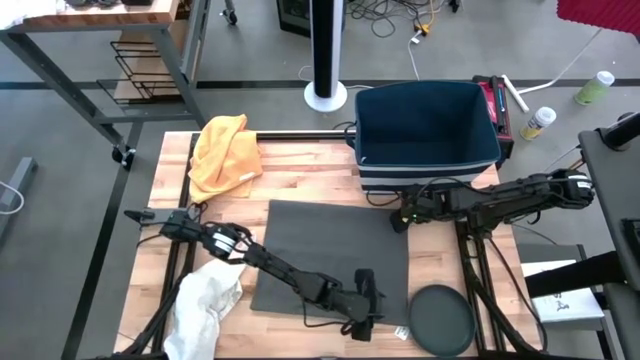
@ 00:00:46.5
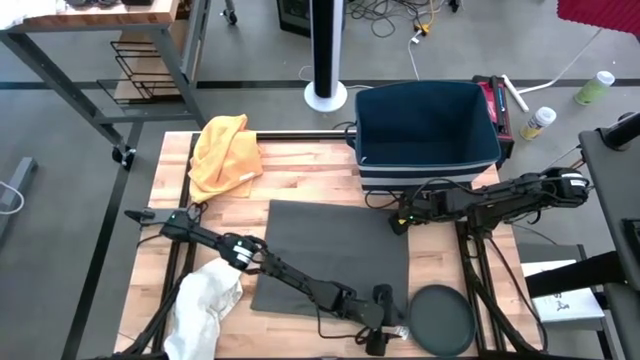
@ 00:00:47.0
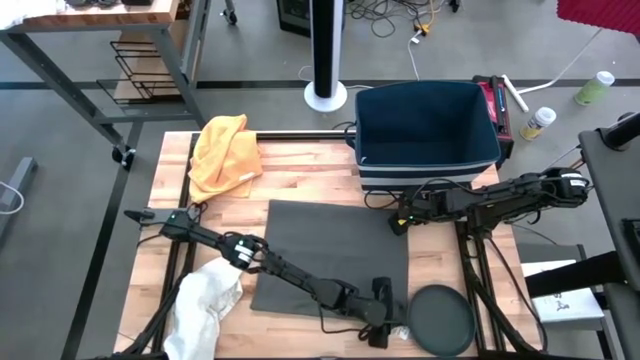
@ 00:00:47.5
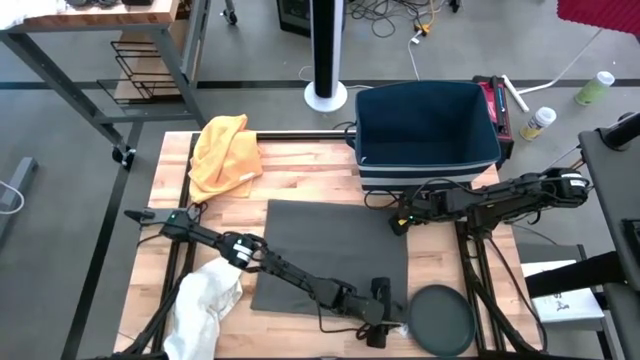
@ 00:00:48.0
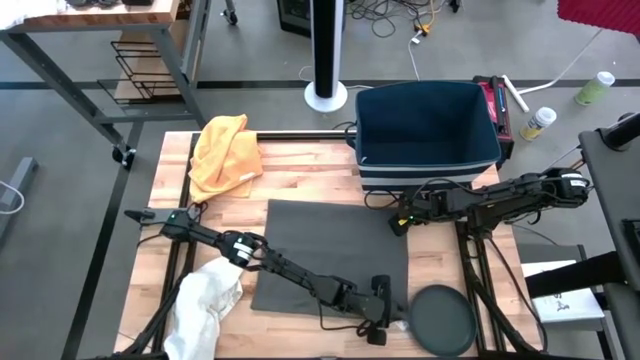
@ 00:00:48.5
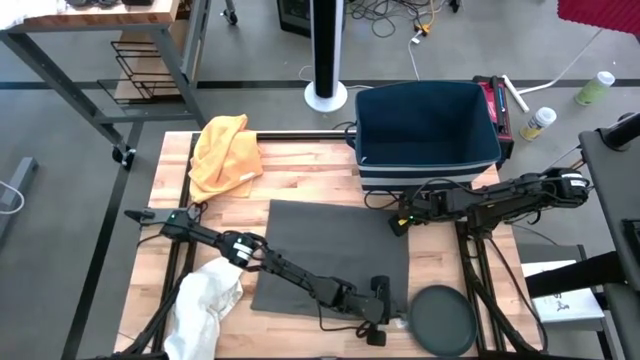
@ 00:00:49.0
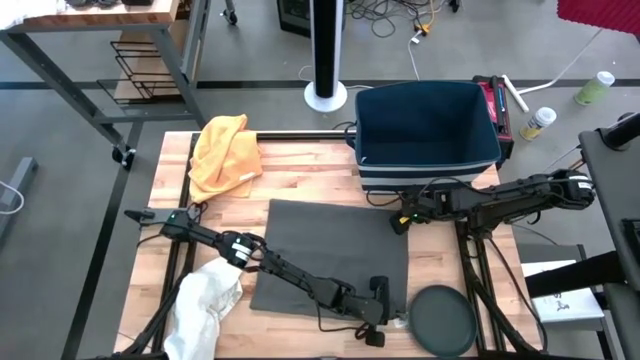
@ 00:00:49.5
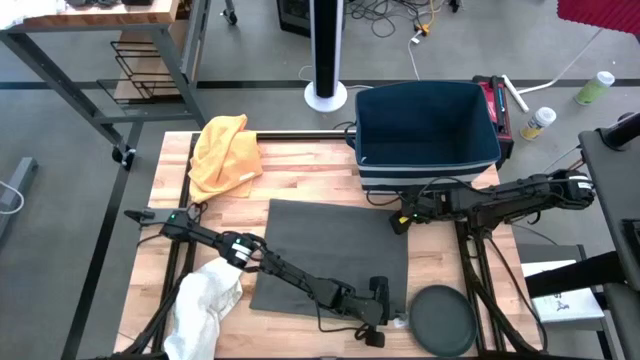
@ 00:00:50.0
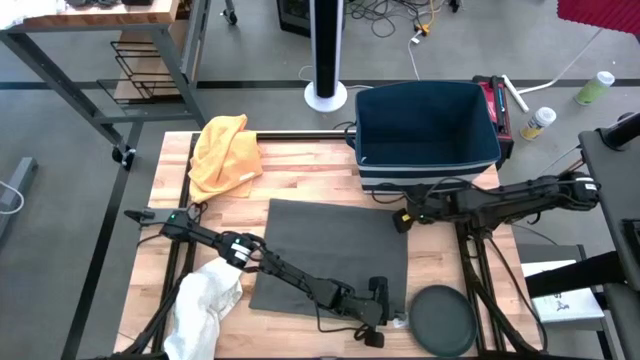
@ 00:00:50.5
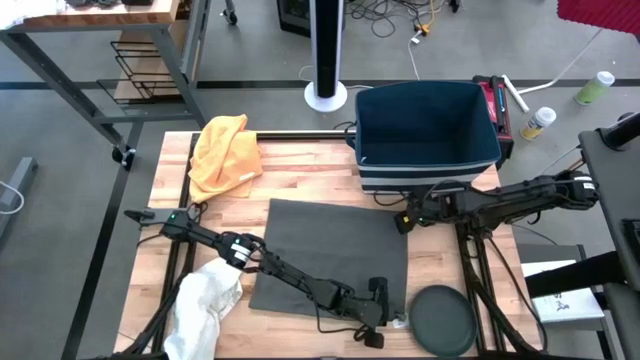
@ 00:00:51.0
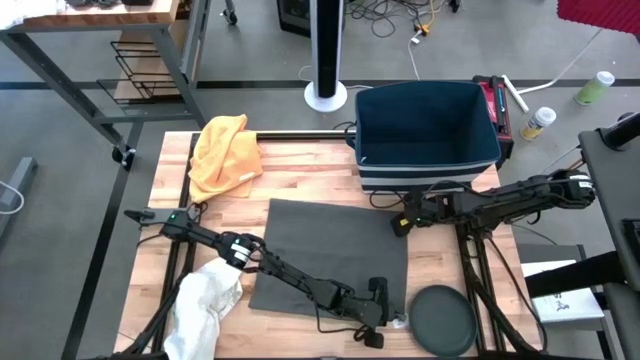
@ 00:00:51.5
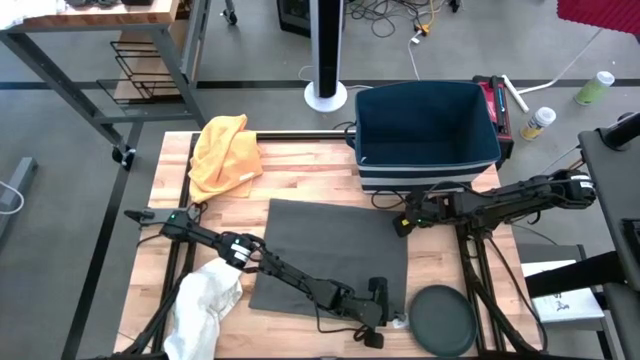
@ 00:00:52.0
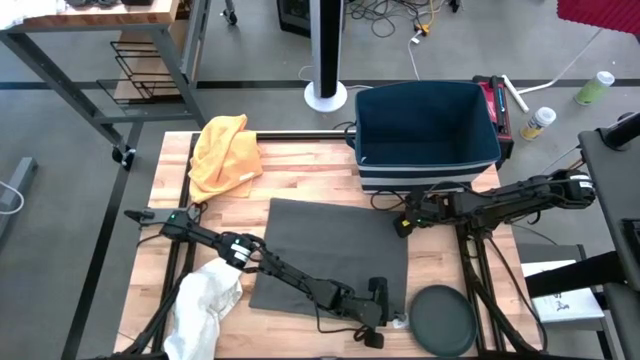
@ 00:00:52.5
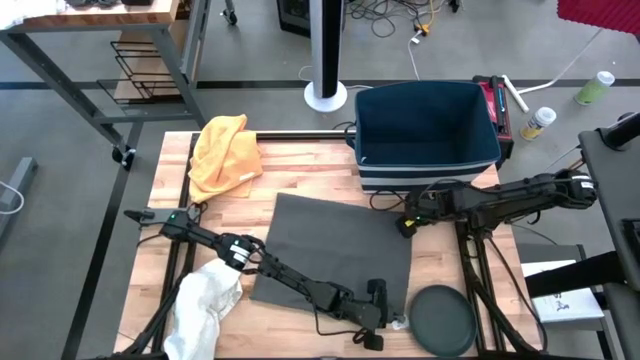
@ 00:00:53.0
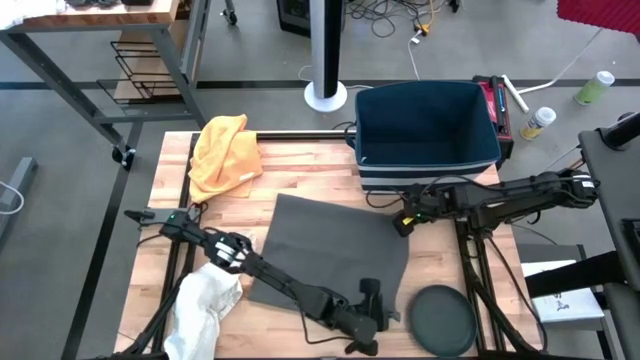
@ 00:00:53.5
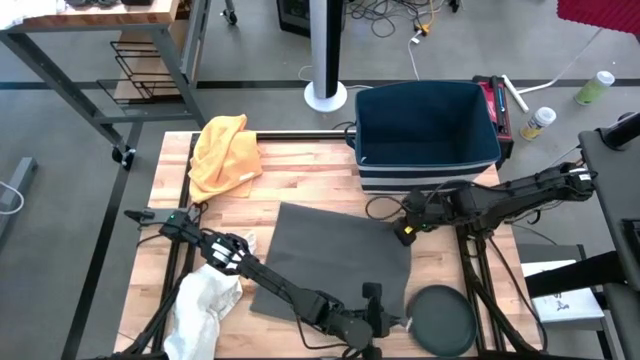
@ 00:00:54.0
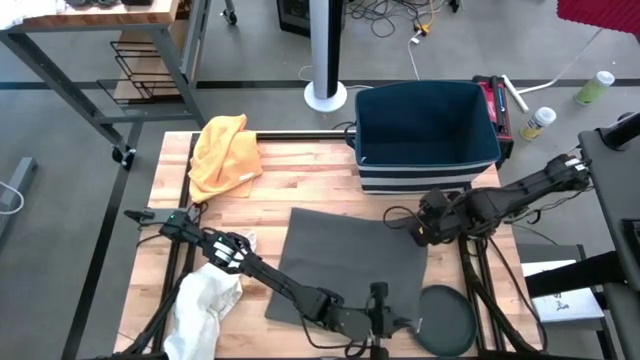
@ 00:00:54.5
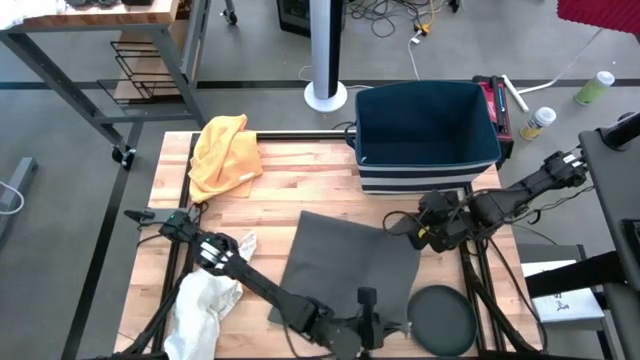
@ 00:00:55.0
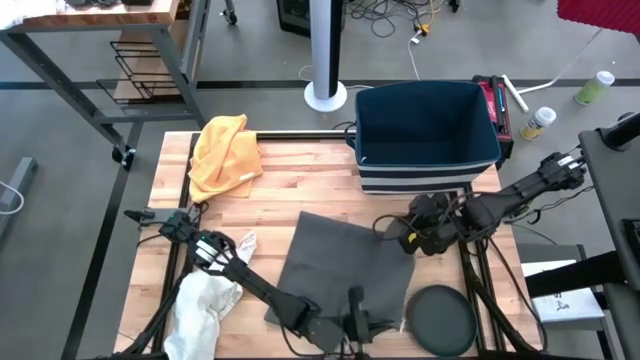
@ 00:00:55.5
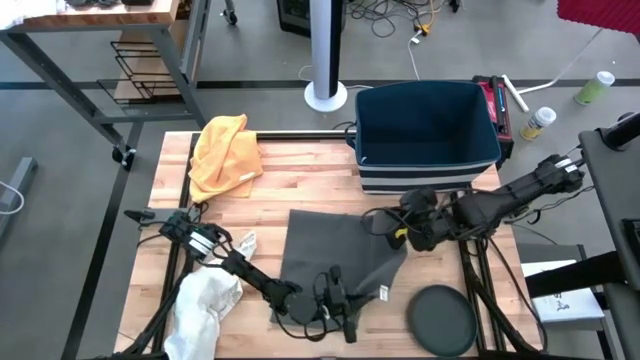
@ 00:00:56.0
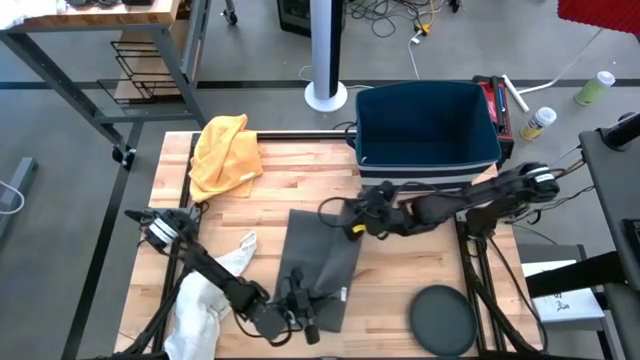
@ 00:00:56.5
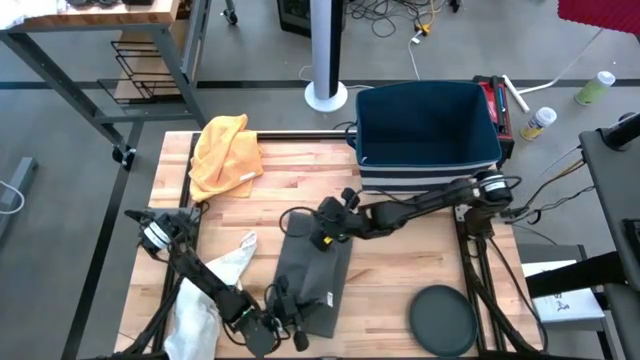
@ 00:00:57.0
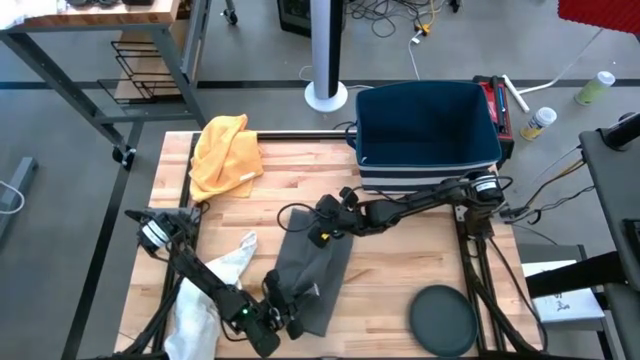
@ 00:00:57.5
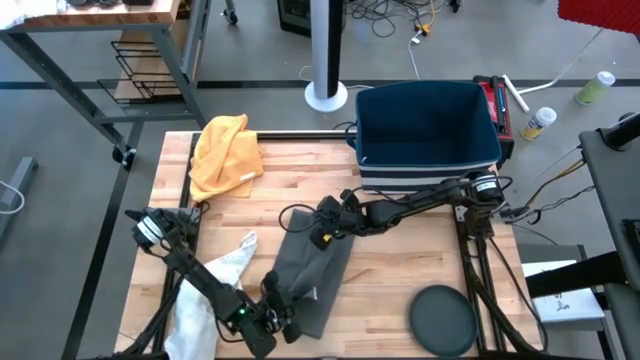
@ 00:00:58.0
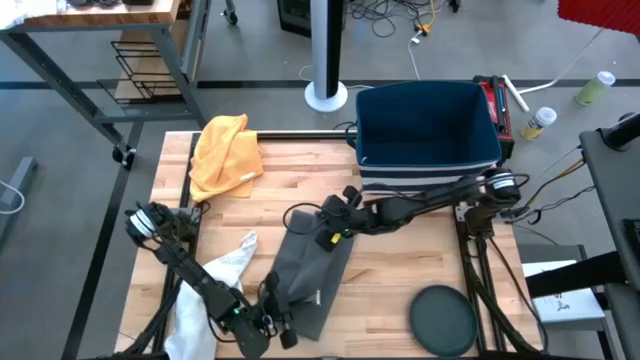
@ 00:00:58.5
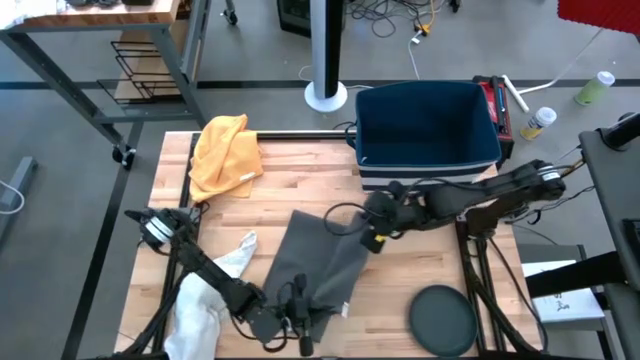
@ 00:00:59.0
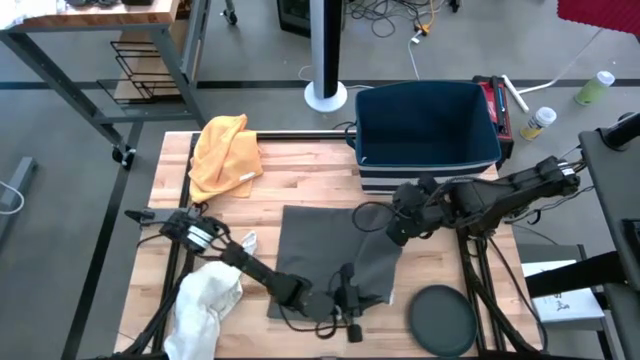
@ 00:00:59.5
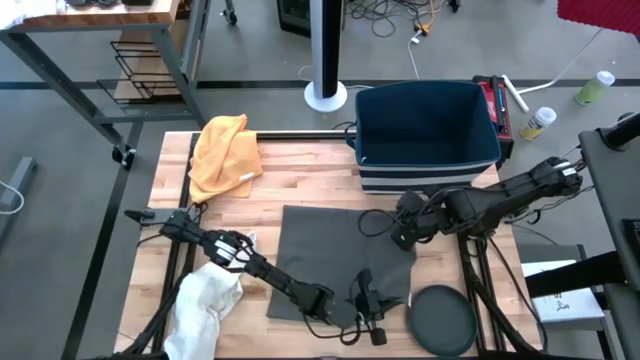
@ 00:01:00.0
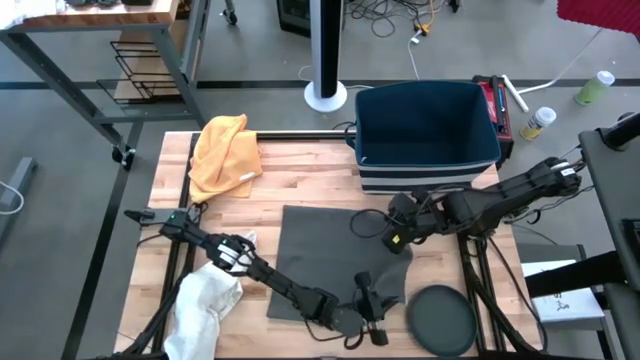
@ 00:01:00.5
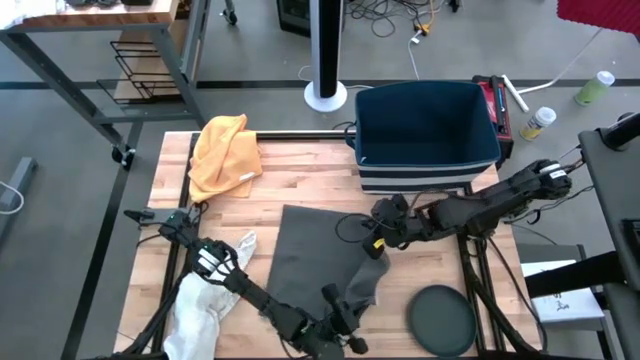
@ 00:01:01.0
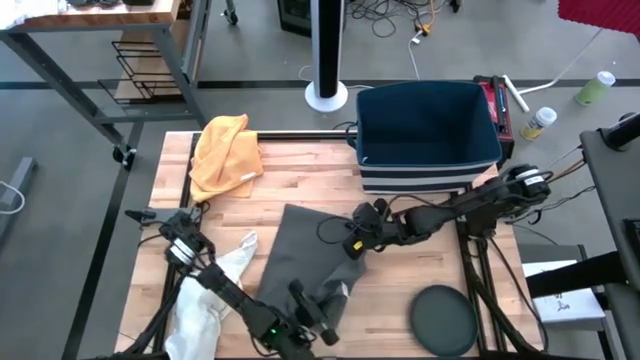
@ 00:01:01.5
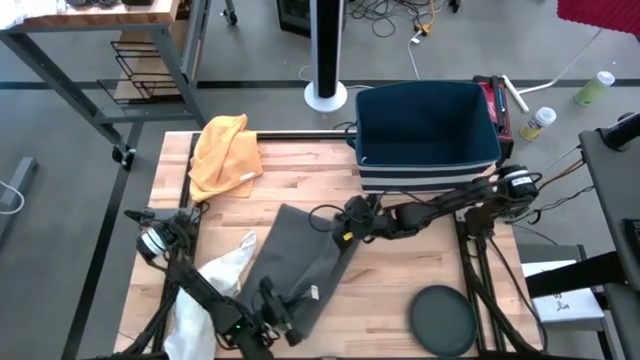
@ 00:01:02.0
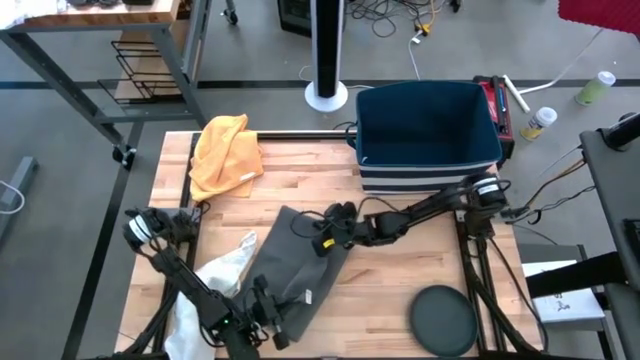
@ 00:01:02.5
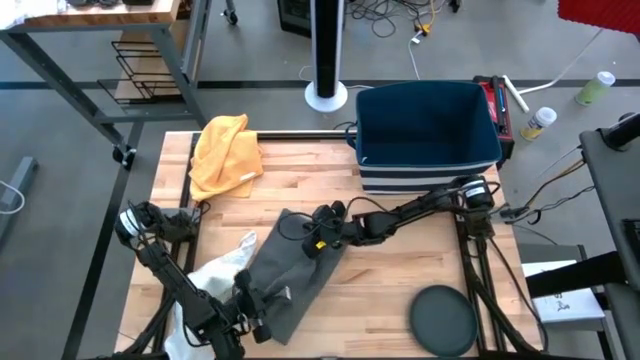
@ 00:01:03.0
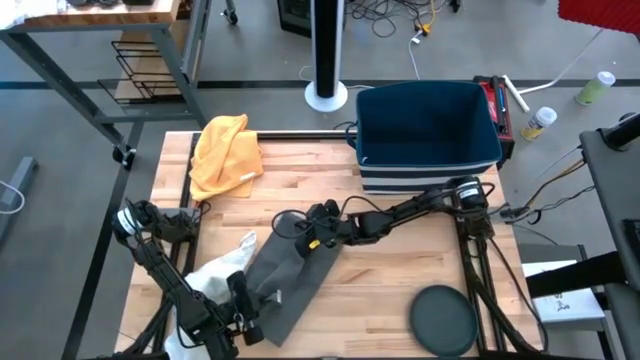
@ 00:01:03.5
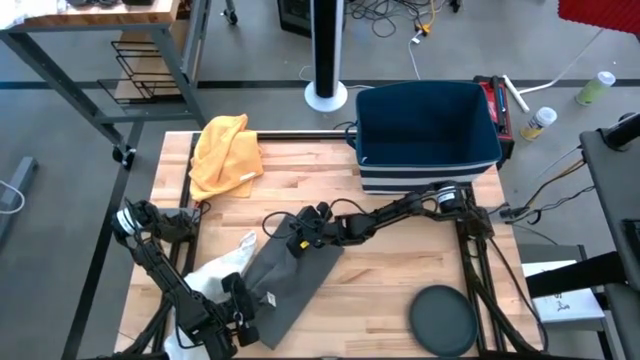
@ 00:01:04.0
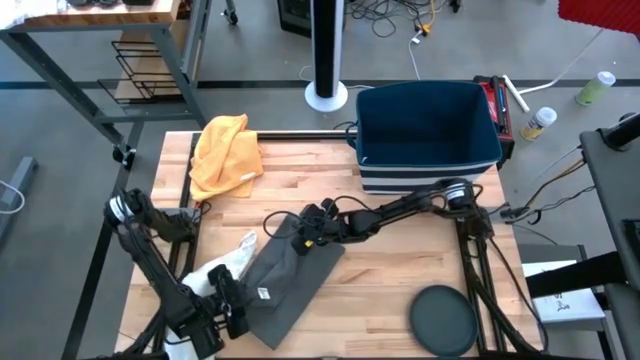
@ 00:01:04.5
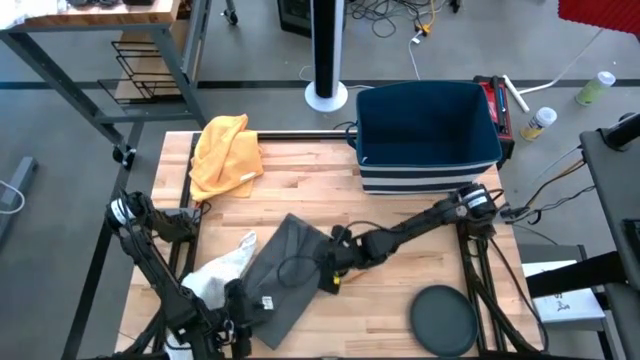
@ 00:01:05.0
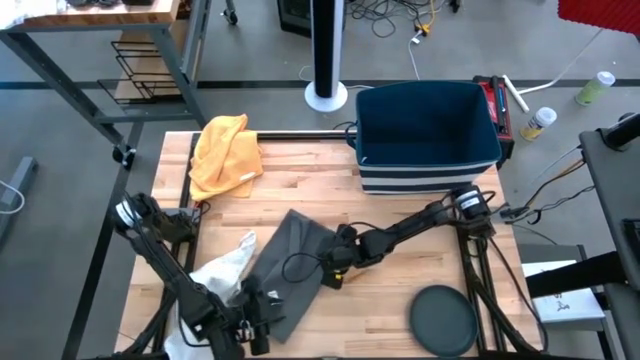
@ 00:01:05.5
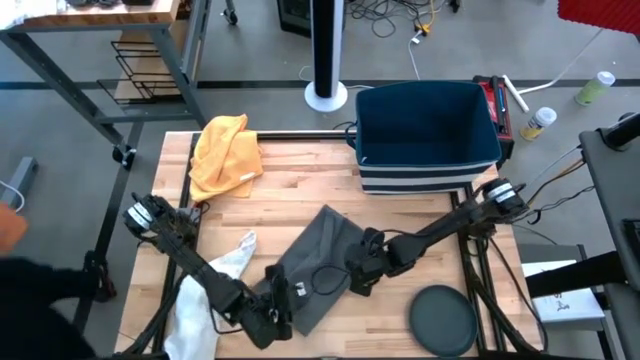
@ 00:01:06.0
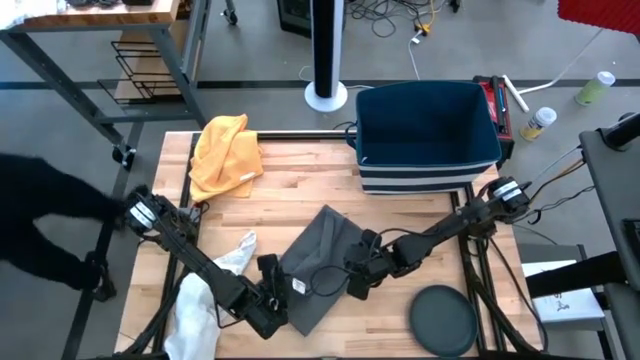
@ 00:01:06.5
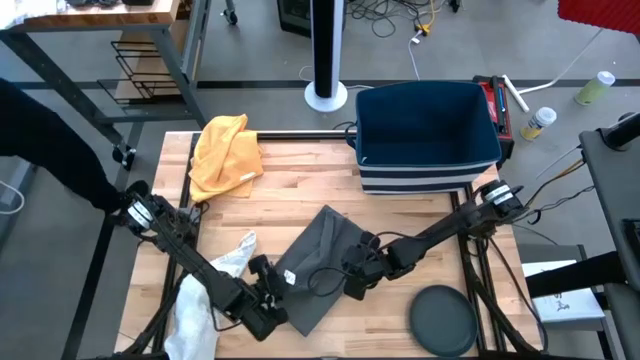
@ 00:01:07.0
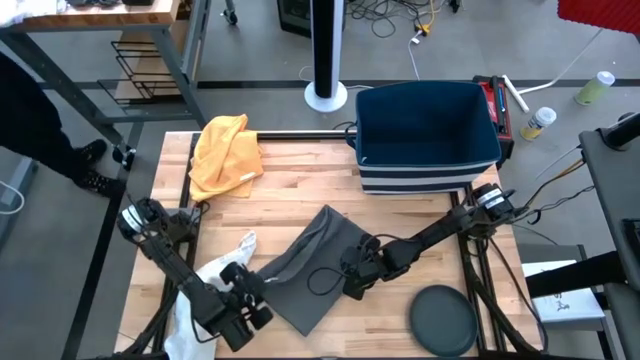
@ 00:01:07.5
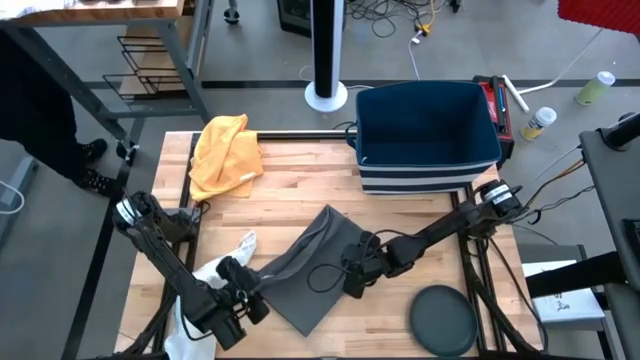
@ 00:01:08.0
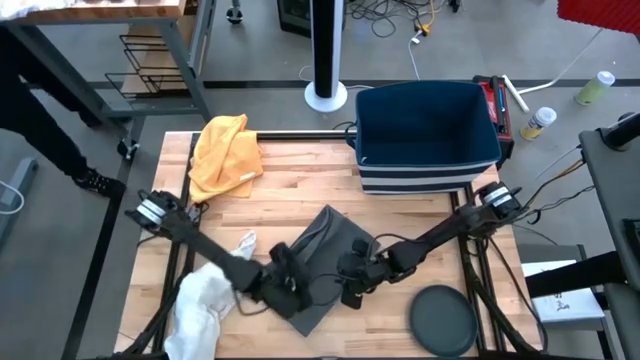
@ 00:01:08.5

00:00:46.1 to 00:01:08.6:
Task: Fold kitchen towel into neat rectangle
Fold the gray towel
